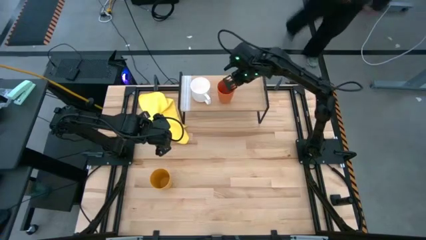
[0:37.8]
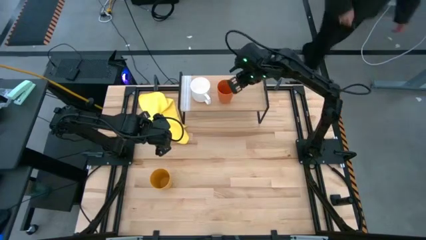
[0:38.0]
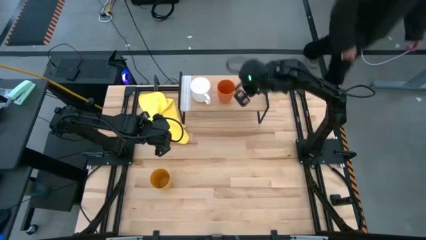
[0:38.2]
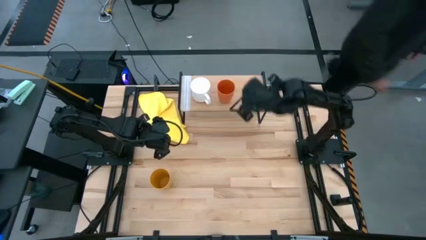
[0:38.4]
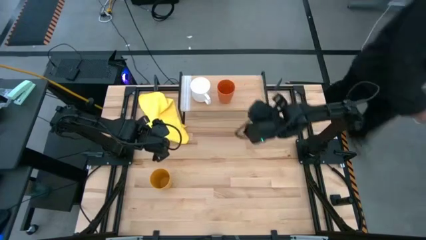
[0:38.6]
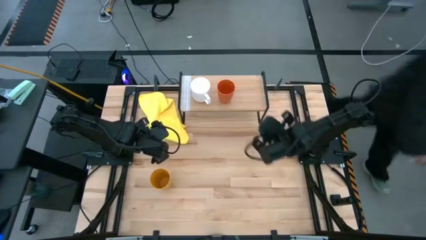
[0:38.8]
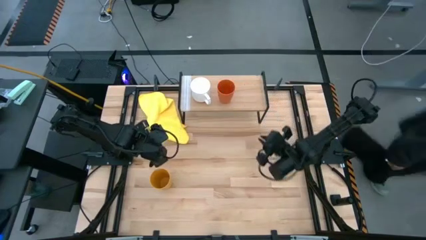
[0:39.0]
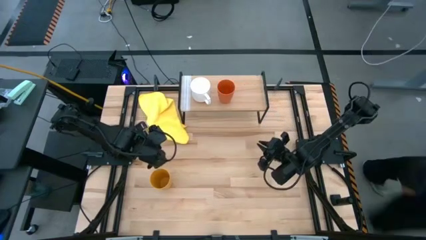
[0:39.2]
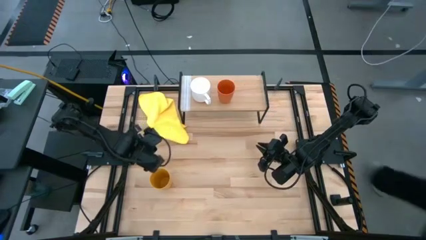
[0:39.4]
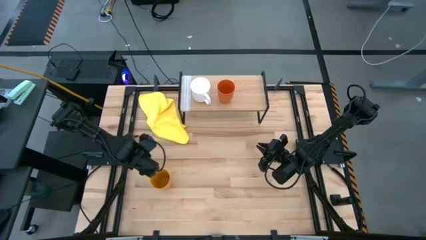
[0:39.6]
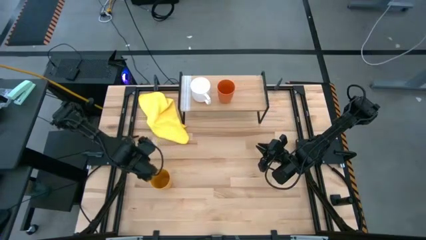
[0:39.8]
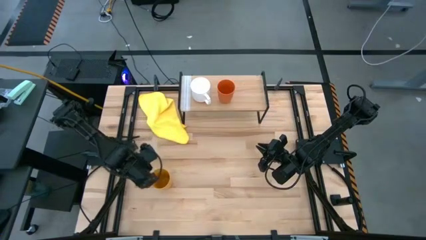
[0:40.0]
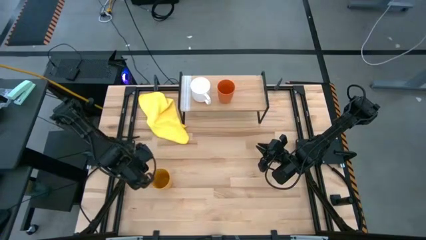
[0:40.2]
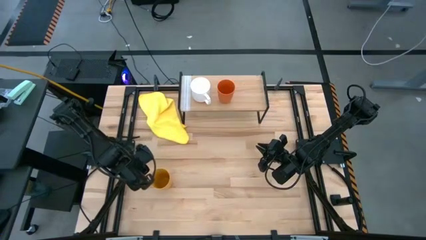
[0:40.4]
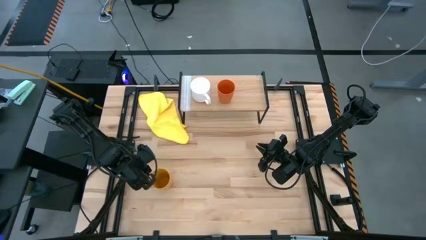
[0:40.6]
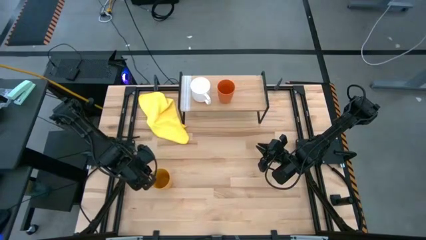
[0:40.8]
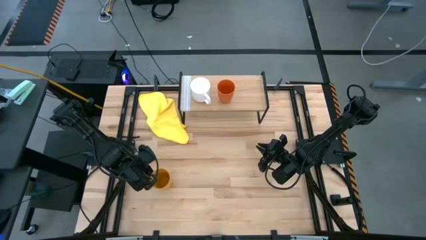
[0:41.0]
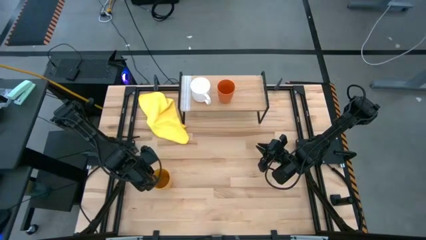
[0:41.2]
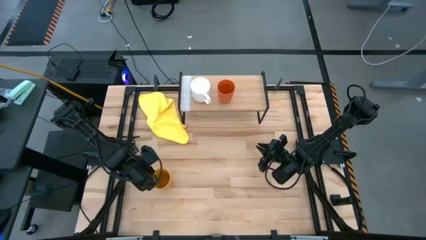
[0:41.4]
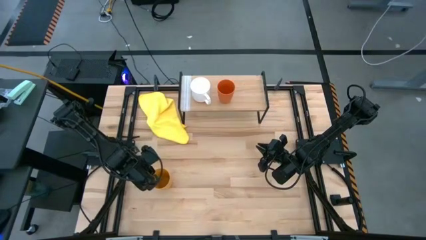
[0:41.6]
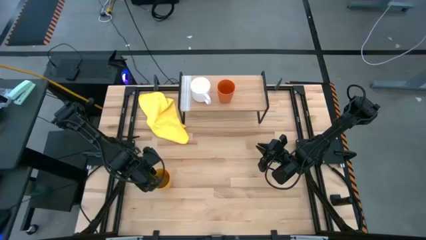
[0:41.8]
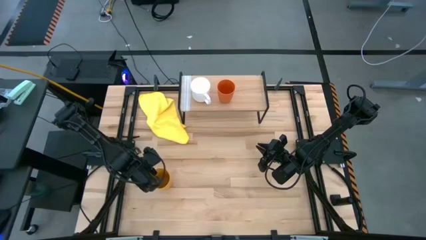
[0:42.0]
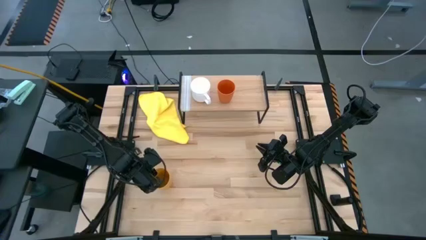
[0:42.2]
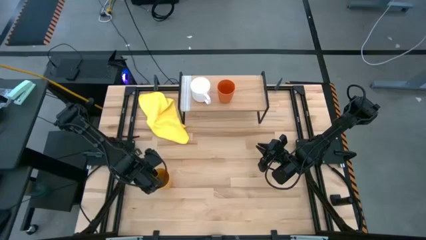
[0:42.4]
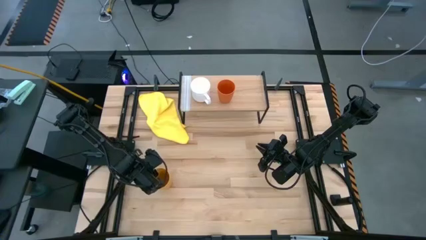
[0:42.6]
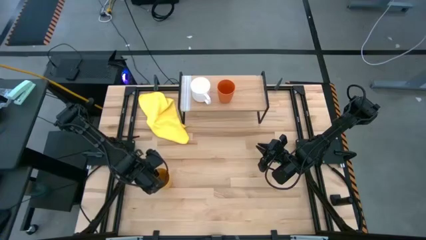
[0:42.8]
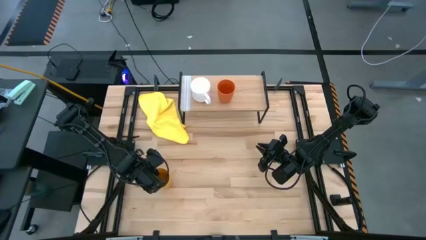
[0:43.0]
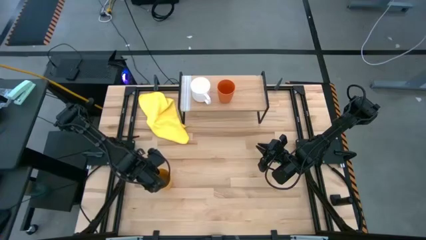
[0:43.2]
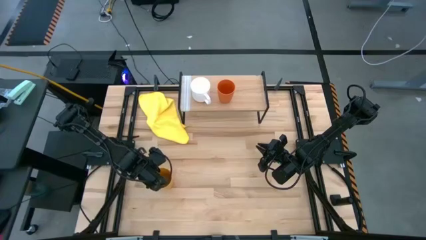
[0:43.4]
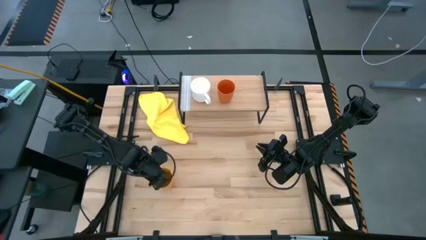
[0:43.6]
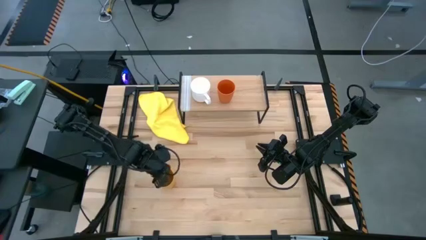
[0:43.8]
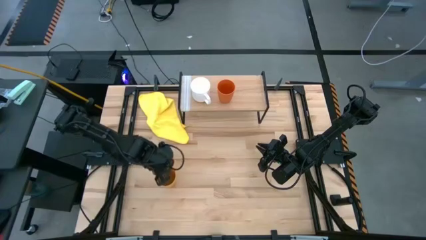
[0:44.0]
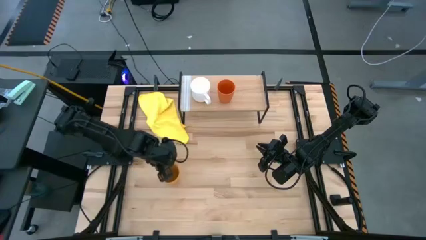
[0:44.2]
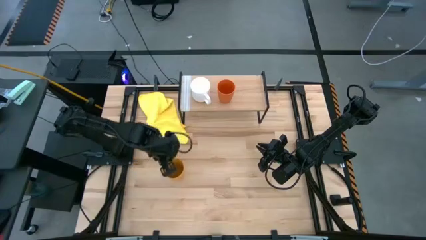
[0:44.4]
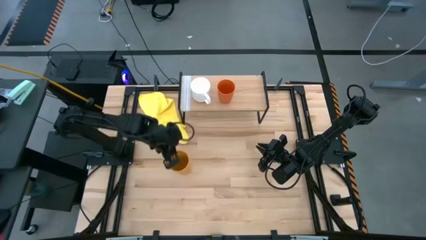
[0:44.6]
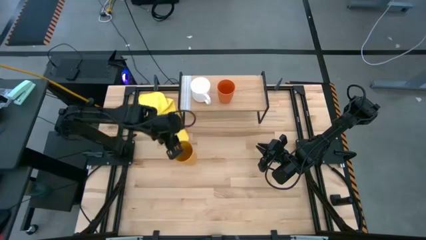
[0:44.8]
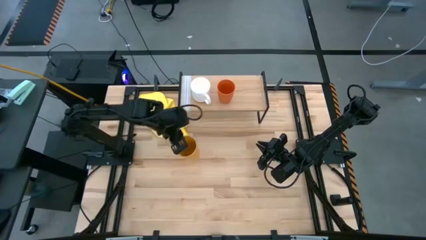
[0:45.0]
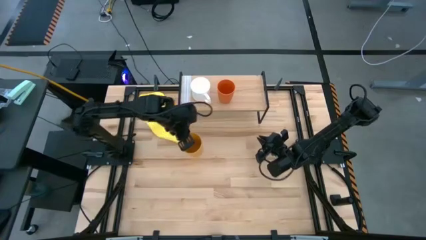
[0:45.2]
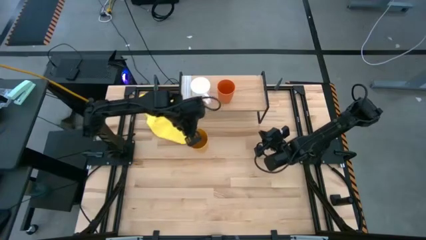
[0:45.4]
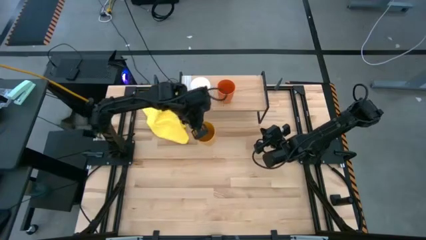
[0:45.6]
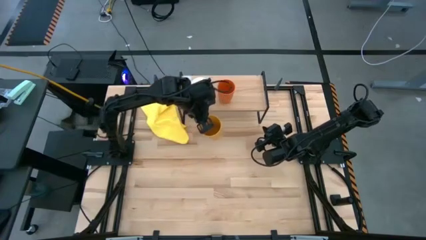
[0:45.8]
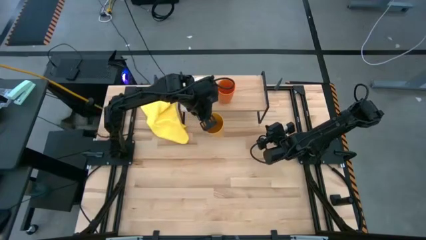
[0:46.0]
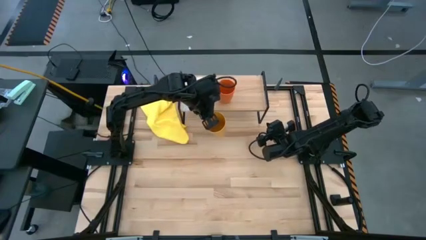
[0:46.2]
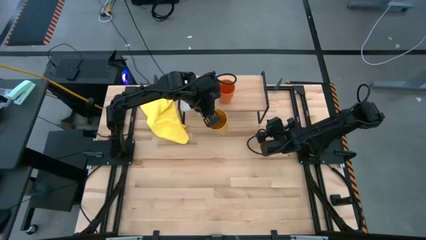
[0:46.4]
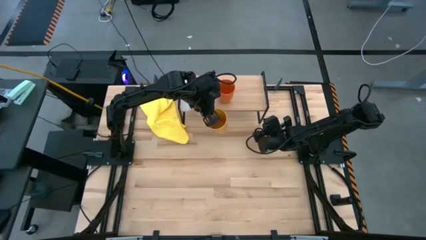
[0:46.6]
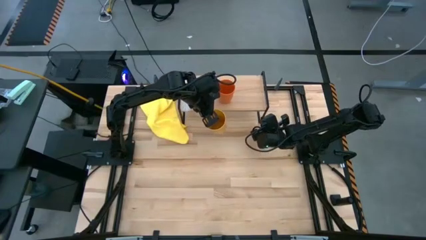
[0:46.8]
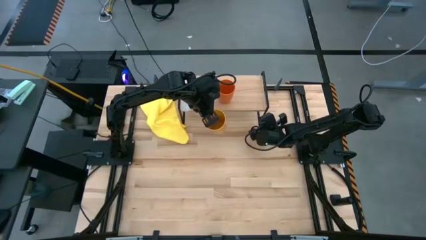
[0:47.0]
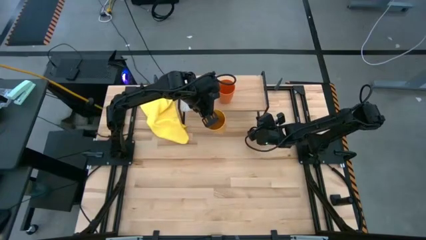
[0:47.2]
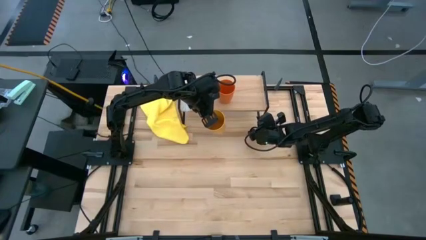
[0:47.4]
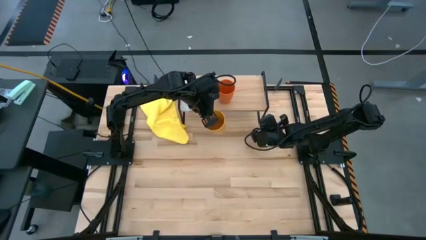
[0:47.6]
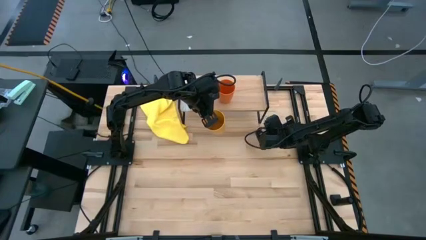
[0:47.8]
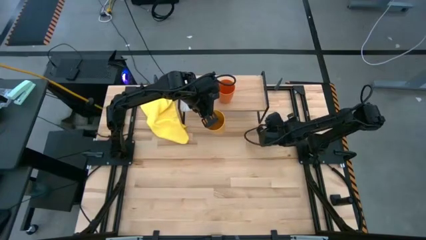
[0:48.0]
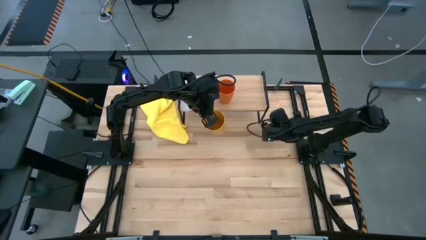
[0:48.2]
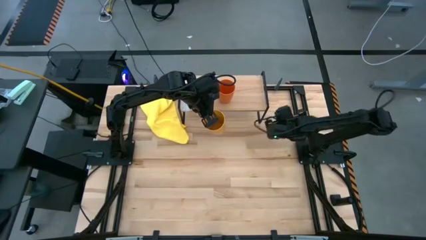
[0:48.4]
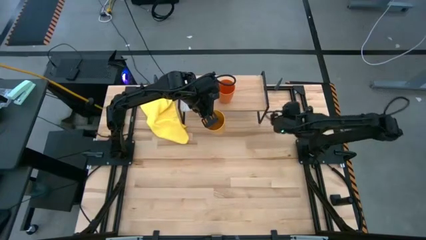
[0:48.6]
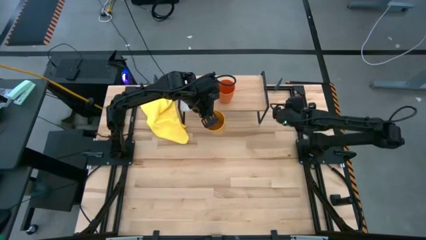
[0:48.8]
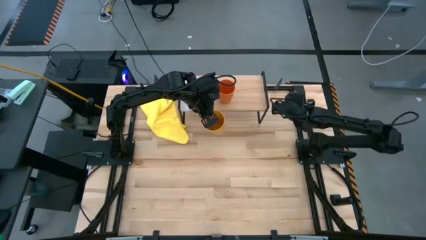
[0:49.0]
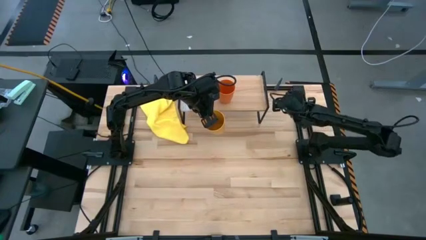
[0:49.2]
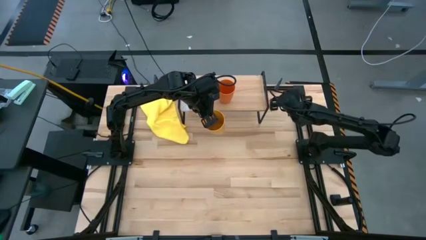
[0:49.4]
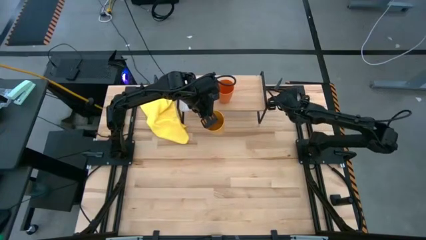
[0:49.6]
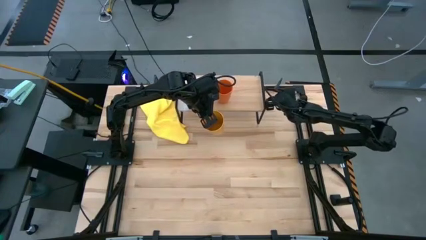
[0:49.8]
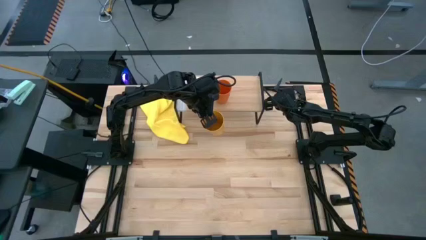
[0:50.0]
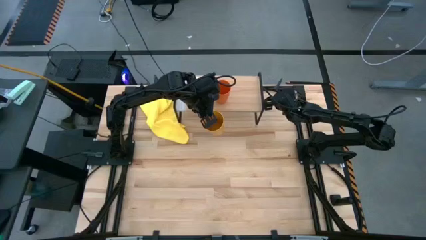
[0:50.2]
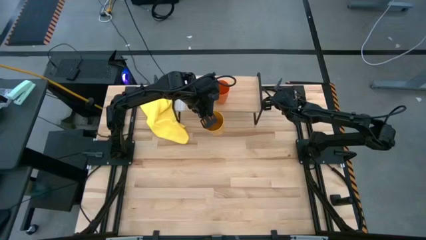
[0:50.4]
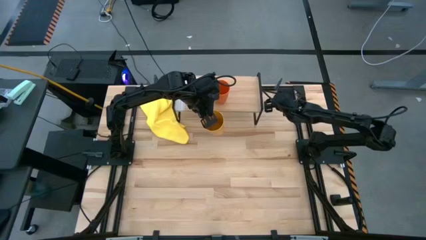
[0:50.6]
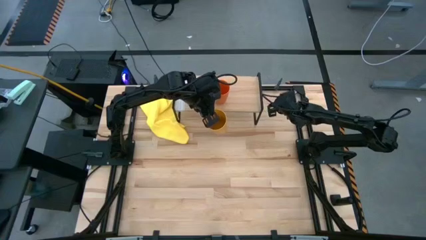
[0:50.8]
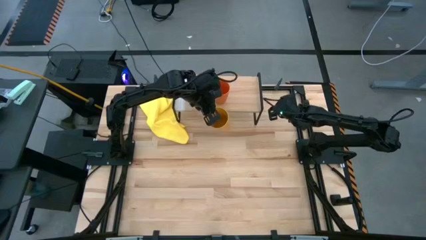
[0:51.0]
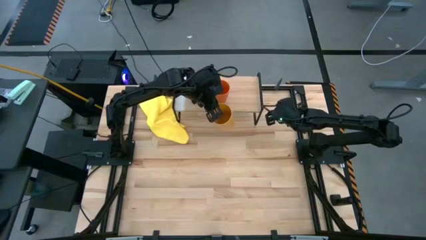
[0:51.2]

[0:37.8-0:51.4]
Task: Stack small to large cups/mugs on shelf
Put the yellow cup on the shelf
